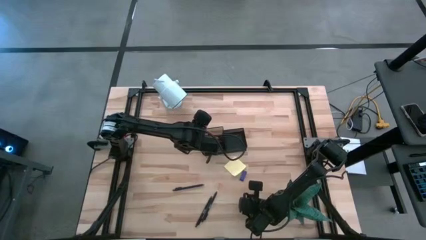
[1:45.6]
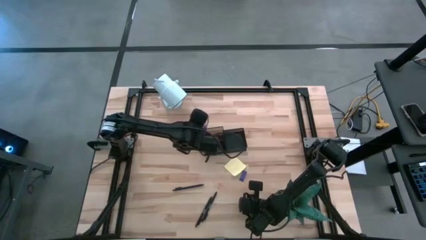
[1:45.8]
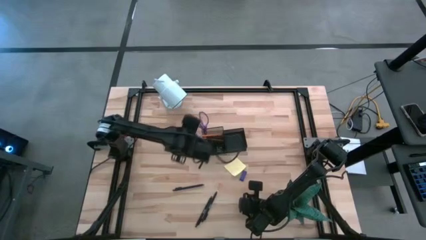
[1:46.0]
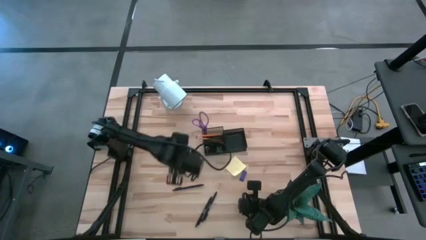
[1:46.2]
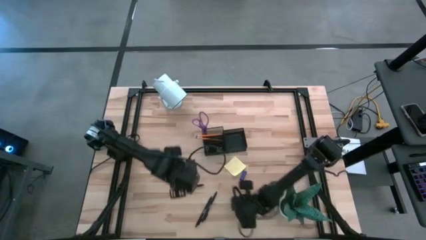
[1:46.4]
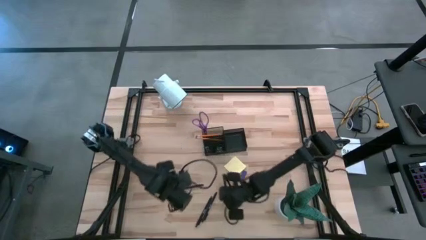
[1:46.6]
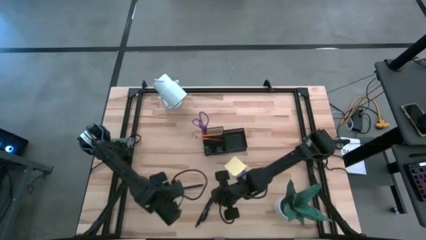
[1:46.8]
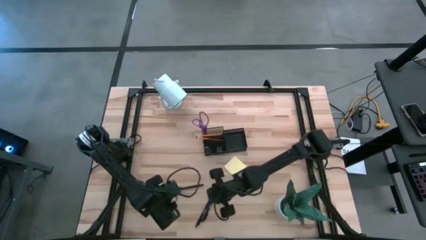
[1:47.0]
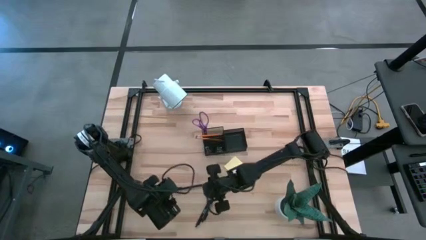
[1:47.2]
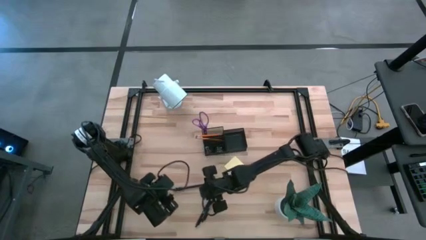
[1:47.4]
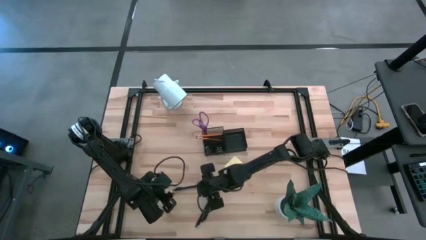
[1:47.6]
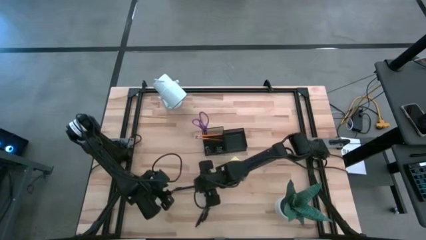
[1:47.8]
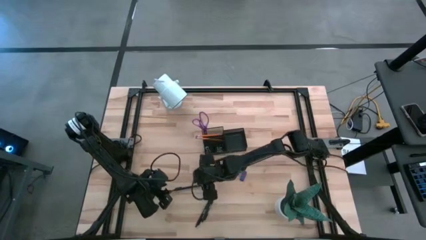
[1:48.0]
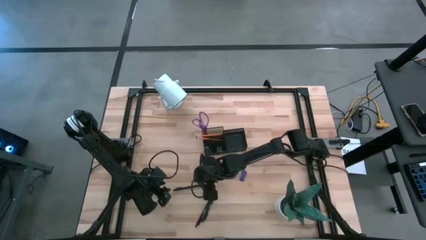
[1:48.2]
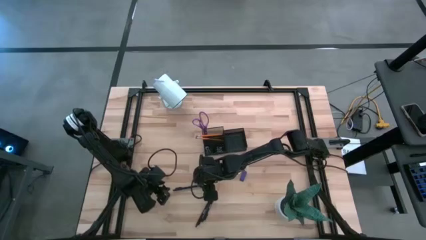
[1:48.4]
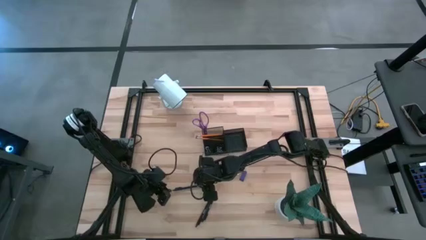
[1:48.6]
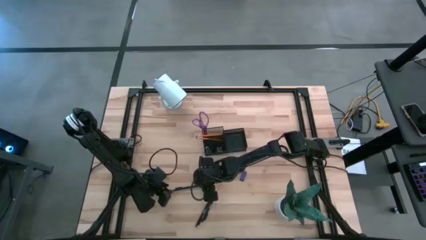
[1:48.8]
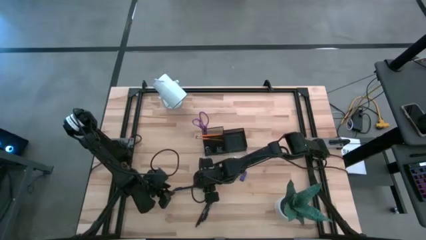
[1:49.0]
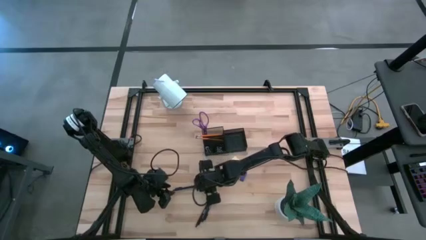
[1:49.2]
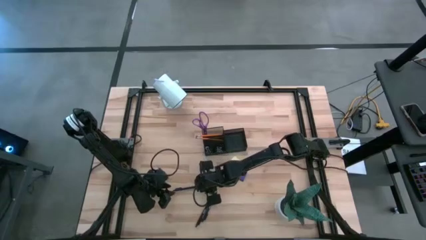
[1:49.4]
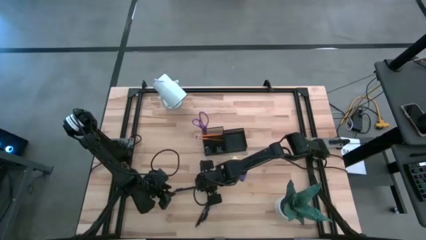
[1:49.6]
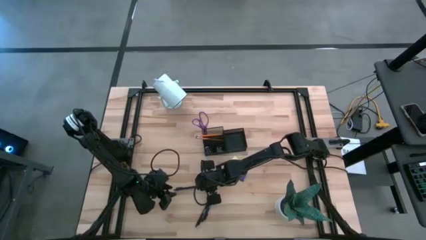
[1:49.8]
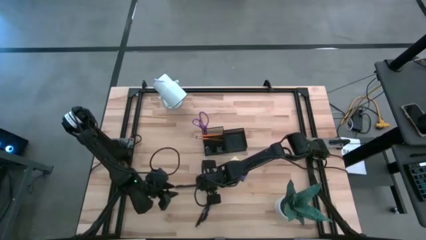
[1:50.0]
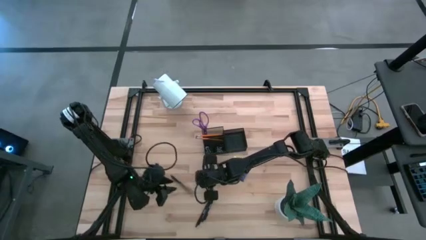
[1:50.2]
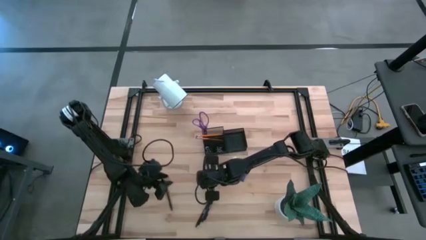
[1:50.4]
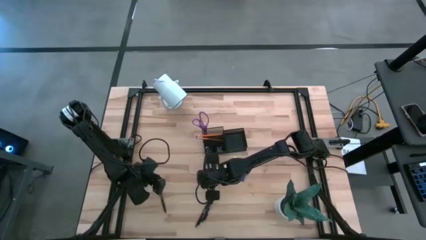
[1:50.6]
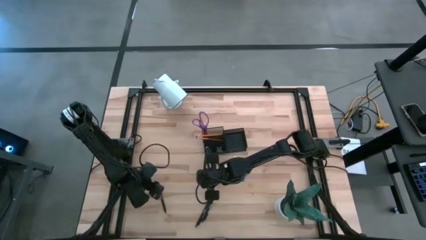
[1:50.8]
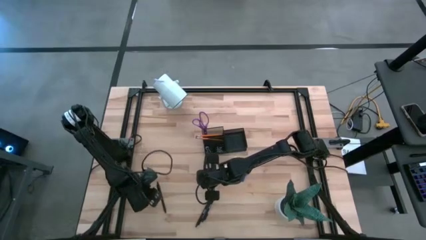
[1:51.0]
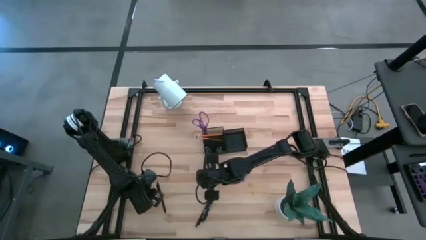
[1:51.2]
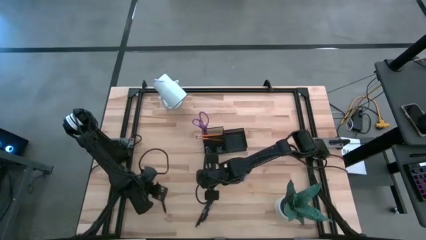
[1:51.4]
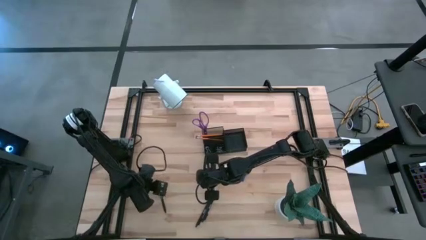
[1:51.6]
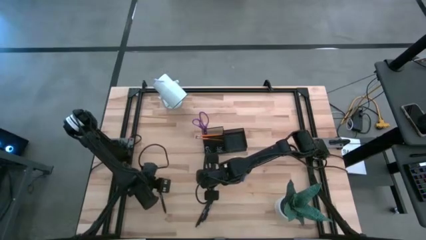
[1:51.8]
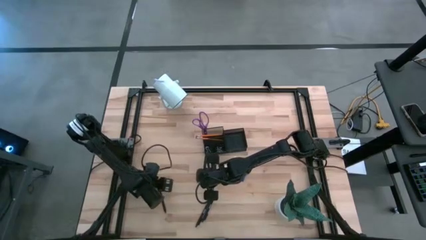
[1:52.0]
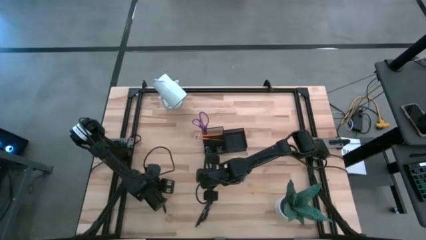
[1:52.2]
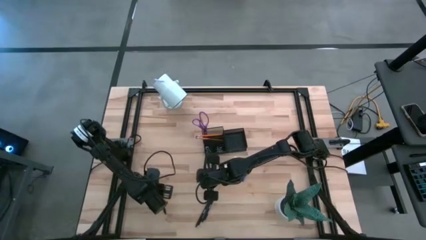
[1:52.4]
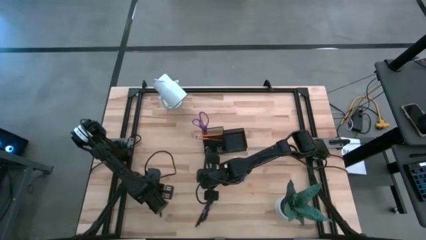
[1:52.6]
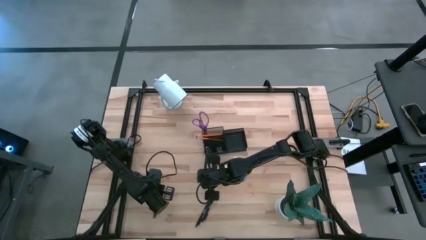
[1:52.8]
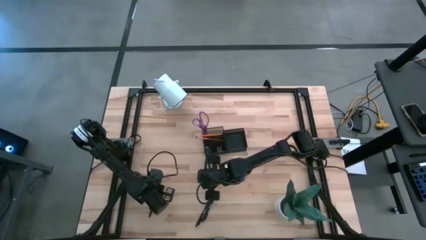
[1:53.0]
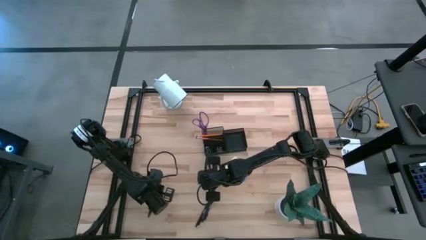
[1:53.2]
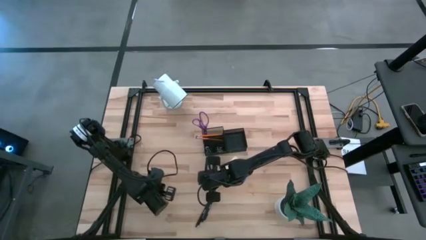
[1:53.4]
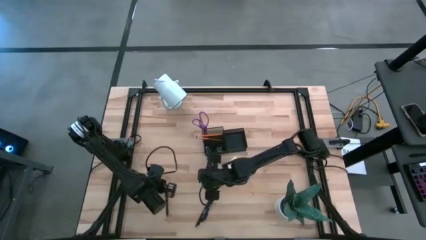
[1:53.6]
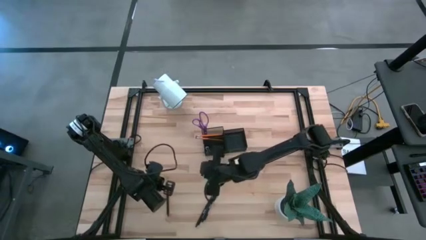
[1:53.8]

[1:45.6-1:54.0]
Task: Pick and place office supplies into organizer
Put the top black pen into the black desk organizer

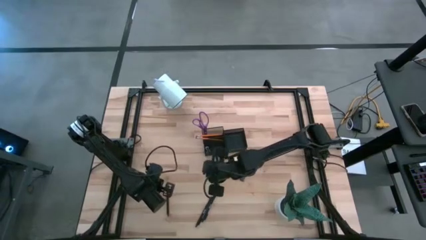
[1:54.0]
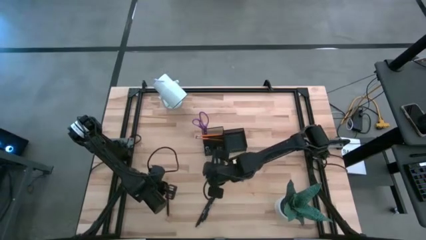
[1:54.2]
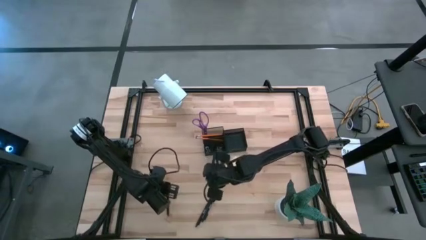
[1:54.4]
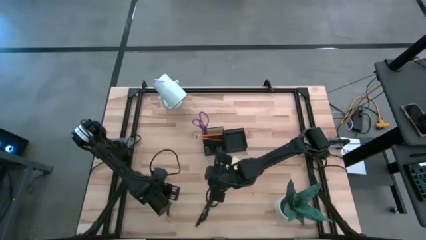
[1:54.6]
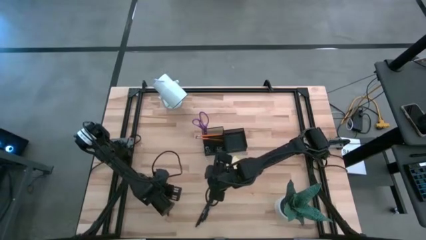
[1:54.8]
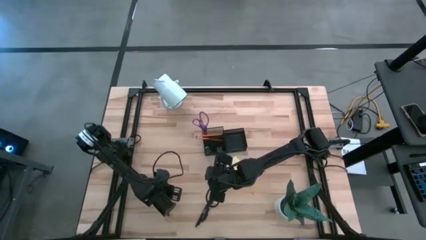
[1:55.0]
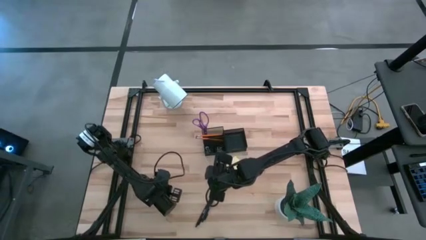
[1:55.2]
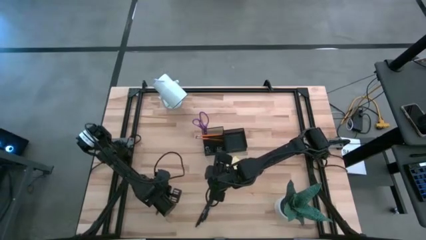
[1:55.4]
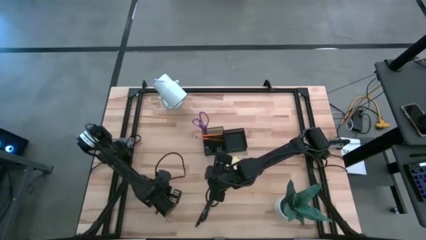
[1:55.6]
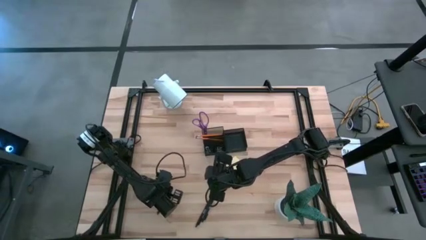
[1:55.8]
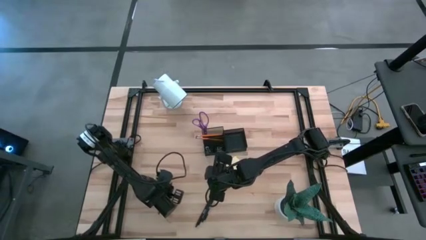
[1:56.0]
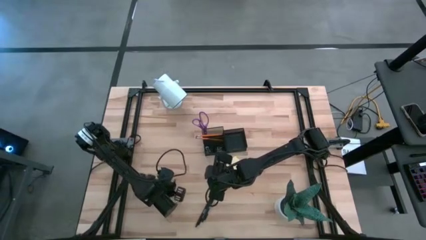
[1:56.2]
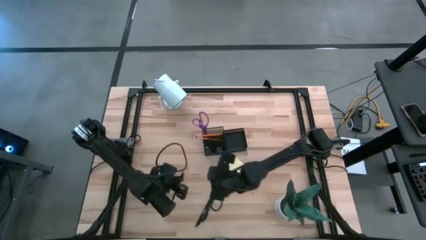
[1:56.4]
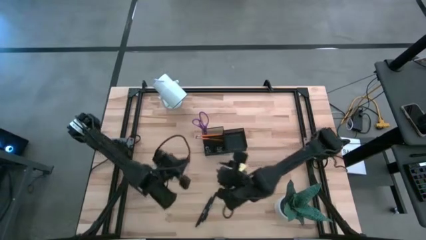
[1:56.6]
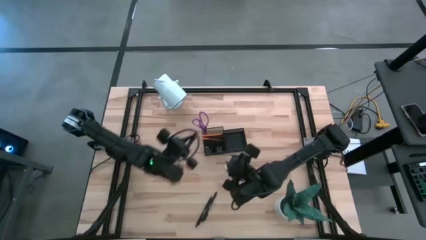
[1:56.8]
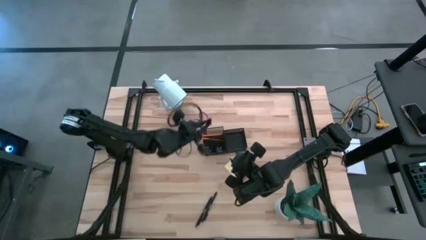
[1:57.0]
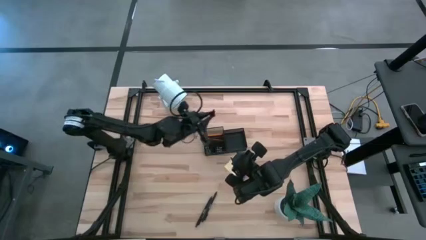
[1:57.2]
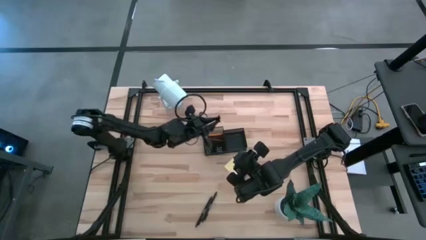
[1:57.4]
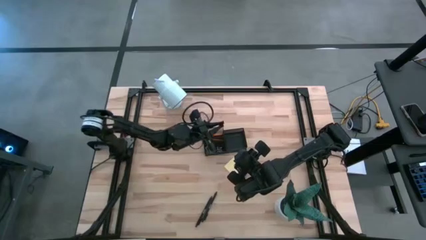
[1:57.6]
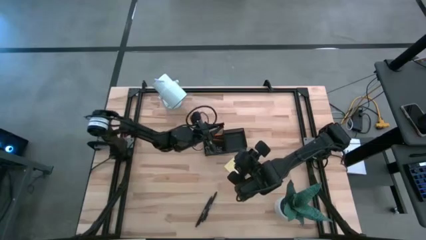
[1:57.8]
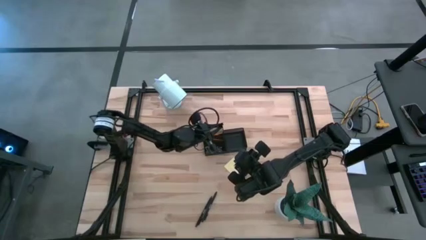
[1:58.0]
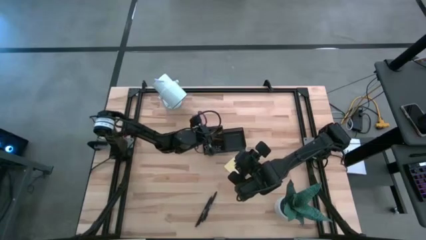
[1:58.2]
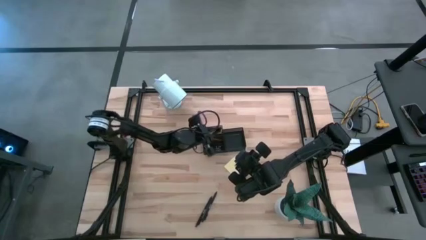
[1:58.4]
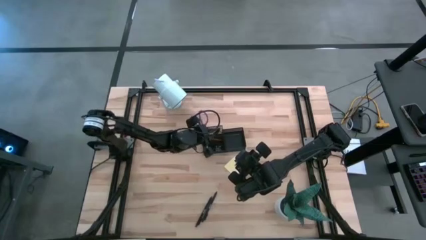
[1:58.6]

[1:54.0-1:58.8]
Put the top black pen into the black desk organizer

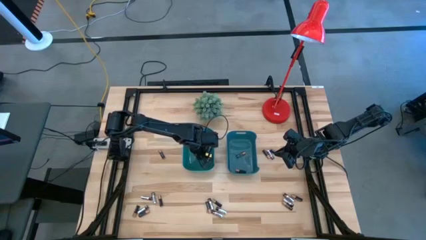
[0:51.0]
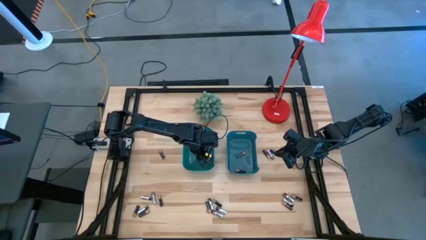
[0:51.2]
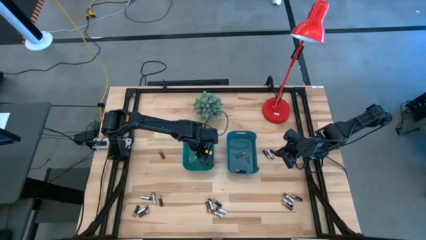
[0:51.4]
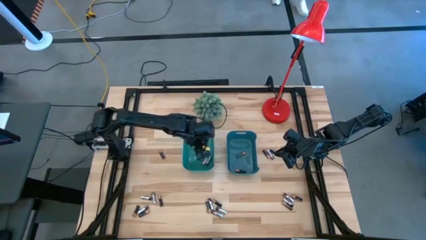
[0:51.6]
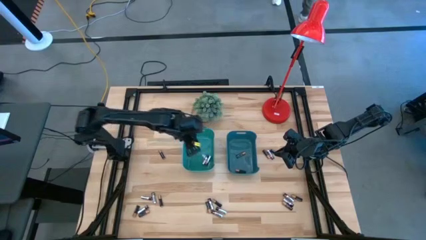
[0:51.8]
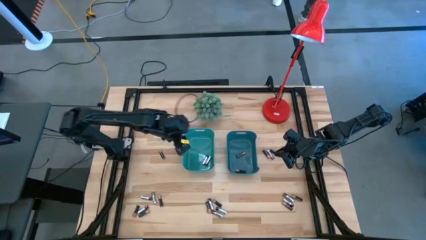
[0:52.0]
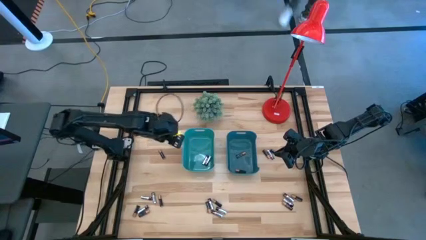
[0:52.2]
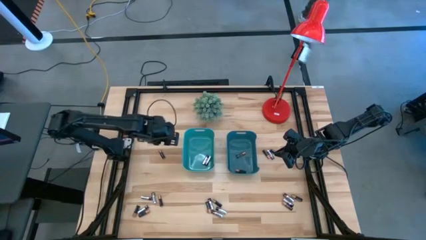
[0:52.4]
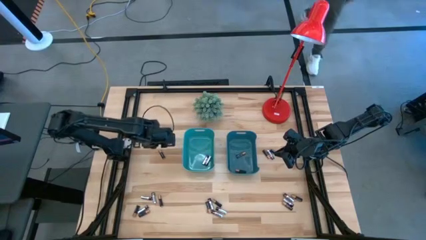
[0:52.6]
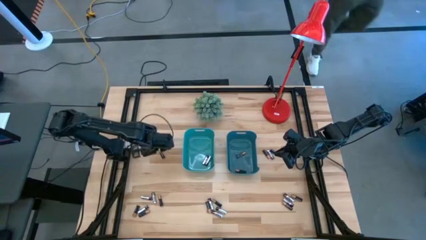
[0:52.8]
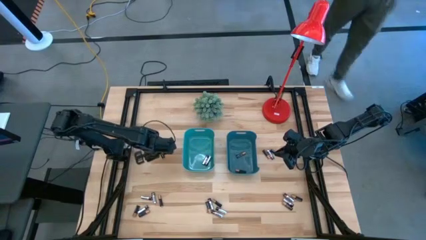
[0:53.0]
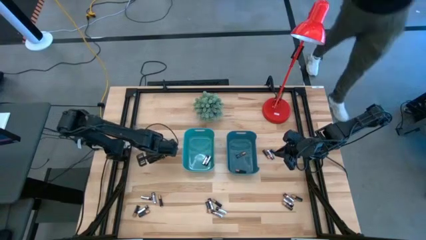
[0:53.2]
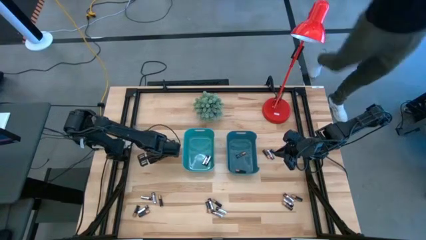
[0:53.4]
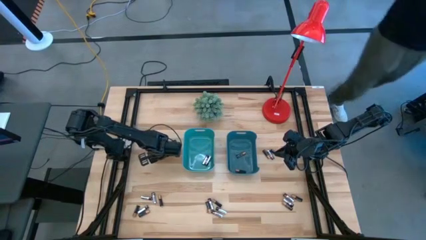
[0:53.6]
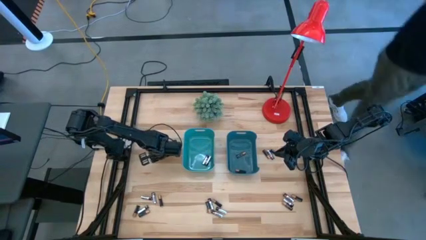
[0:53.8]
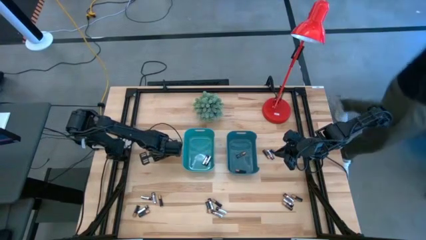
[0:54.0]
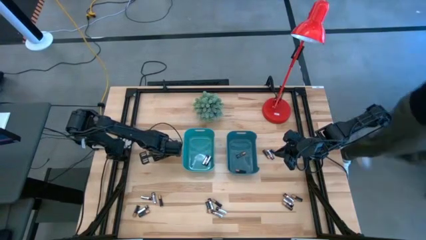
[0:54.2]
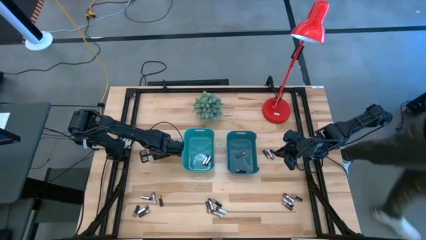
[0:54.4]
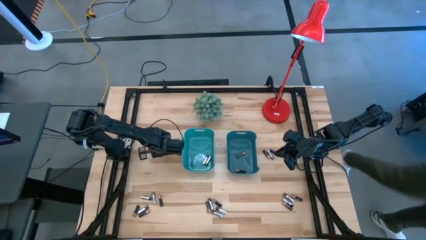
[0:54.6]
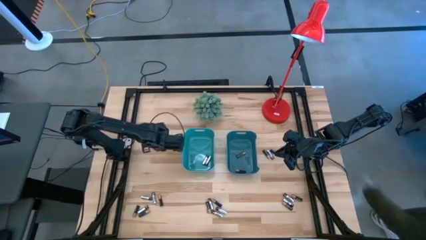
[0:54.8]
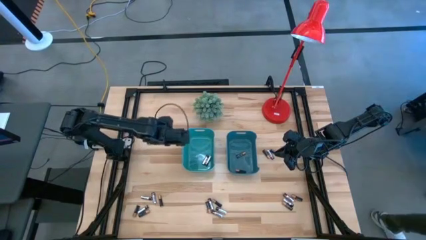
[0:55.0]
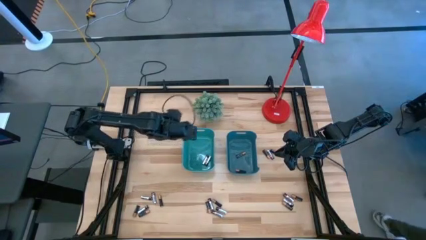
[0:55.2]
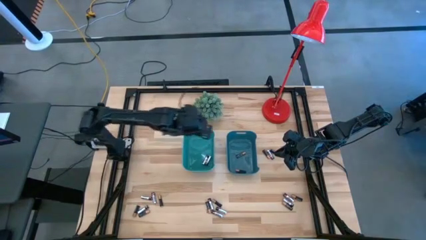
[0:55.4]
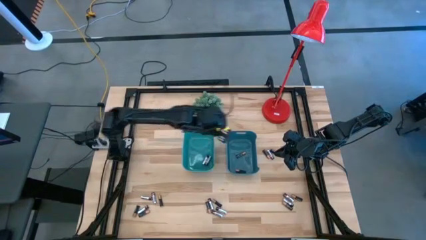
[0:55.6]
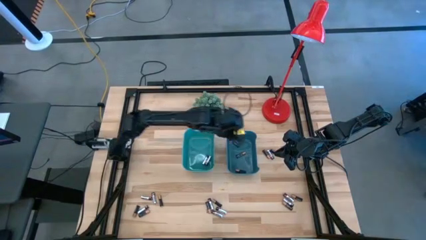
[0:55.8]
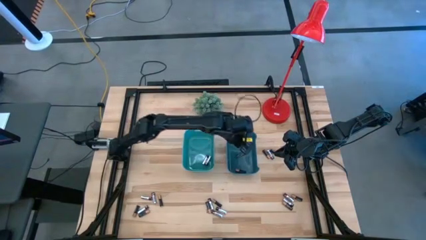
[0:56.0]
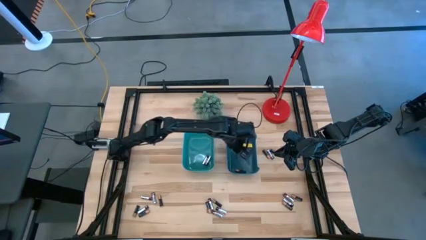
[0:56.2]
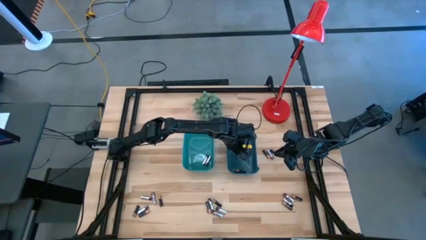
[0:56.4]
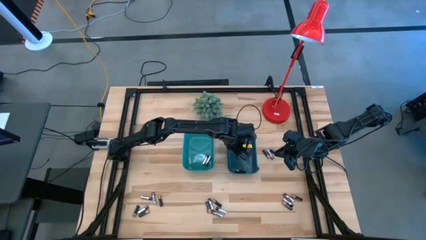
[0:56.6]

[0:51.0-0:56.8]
Task: Sort batteries
Put the black battery into the blue bin
